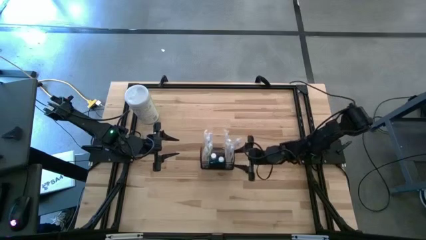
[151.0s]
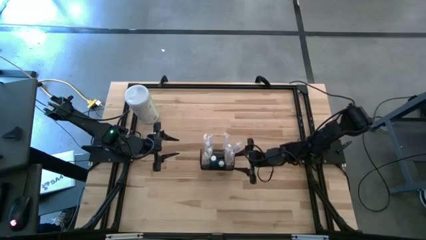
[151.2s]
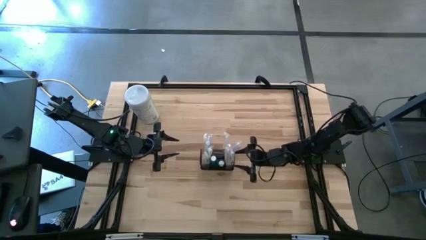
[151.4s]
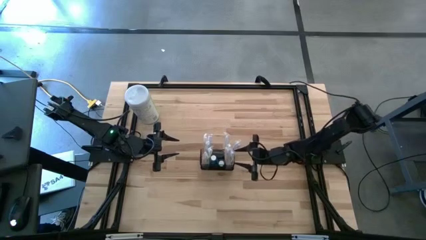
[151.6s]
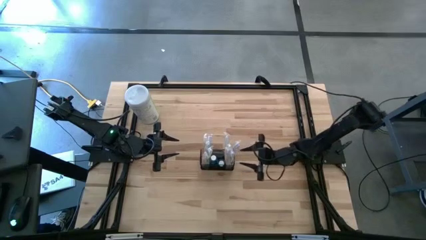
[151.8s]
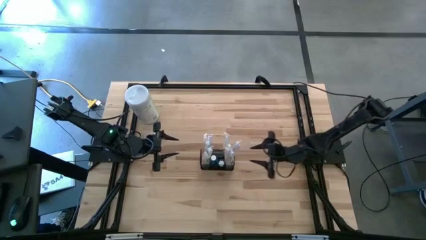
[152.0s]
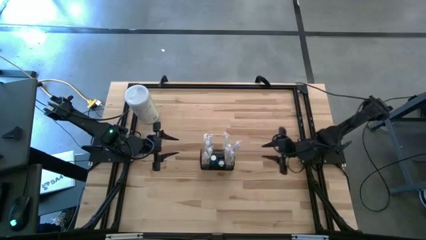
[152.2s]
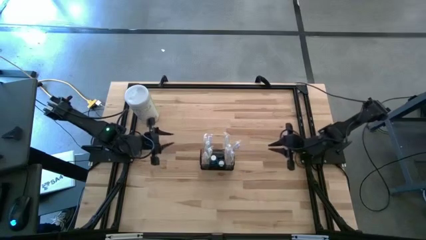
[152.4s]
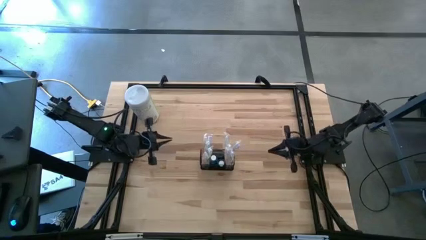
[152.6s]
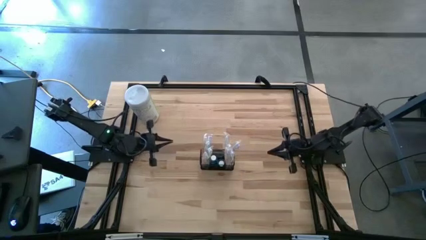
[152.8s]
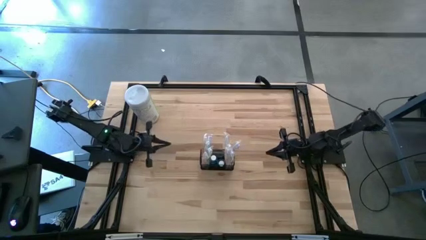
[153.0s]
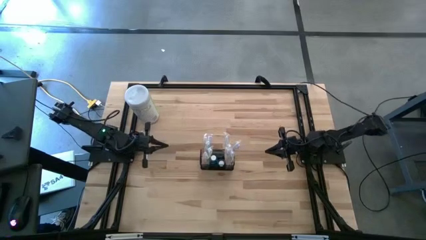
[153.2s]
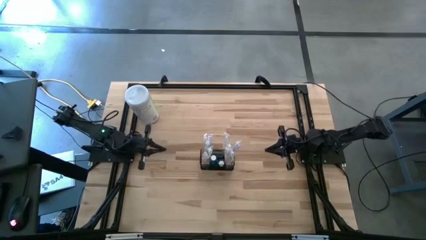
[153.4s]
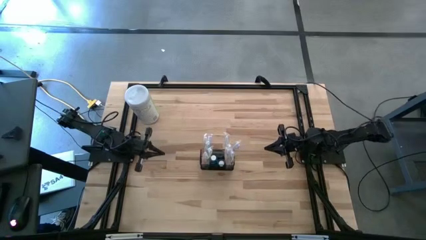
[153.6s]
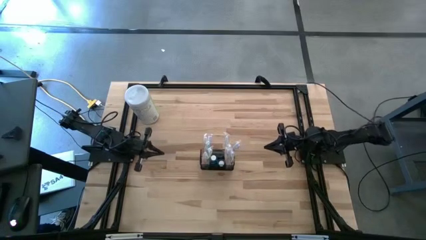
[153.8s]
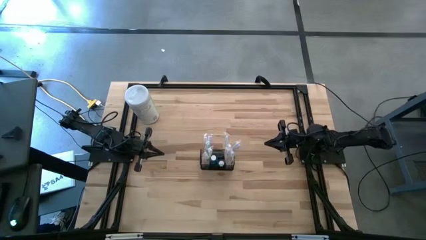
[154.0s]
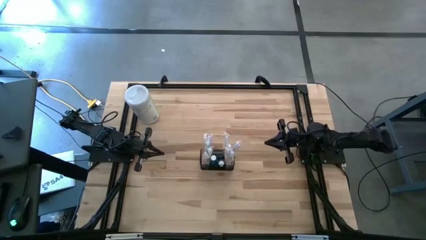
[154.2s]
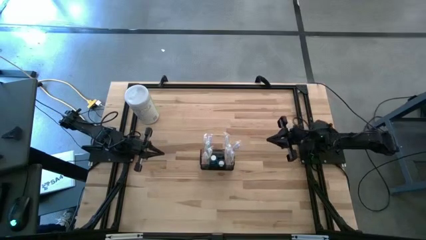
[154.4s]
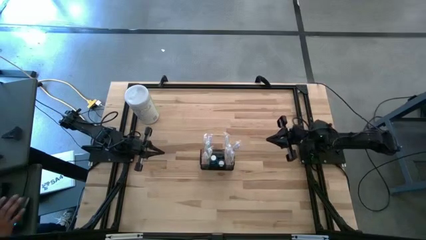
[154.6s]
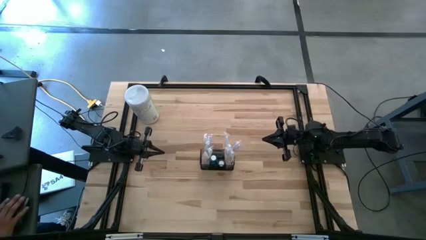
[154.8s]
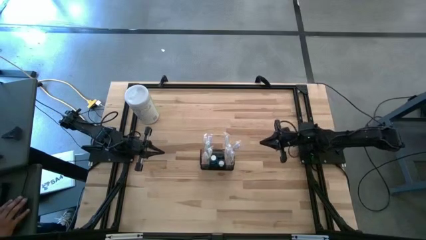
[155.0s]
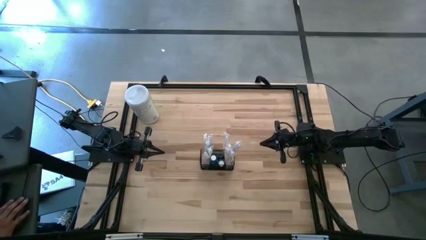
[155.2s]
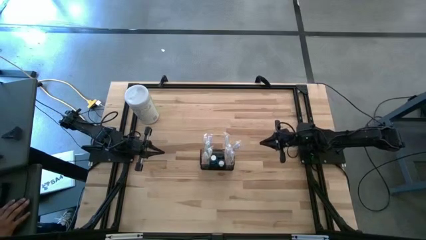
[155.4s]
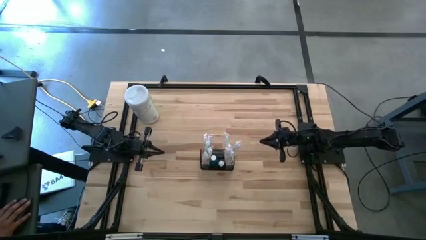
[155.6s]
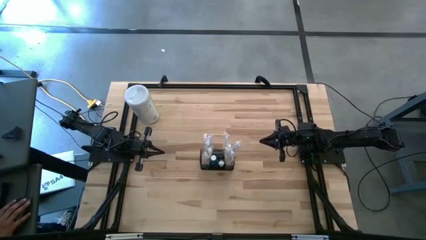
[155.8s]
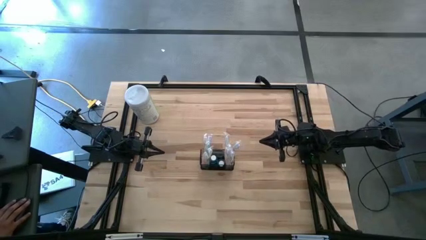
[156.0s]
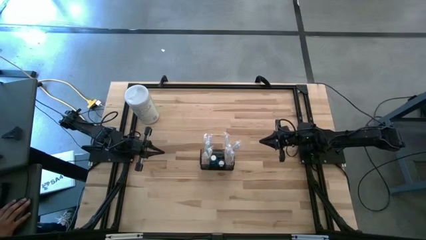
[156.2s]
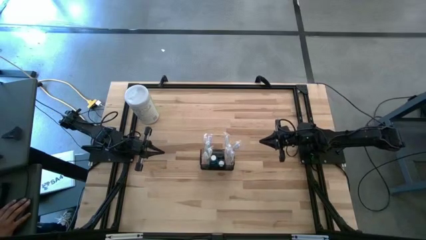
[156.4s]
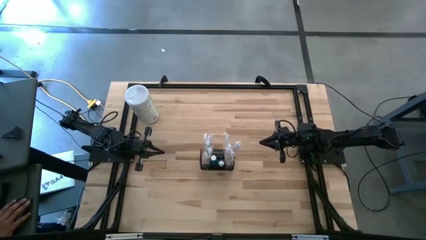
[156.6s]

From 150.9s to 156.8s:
Task: Pick & Place toothbrushing station
Return to Home Position

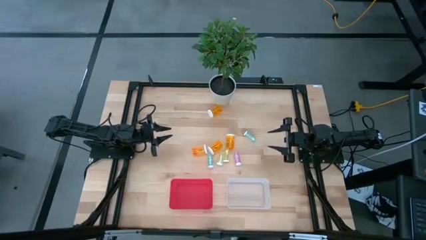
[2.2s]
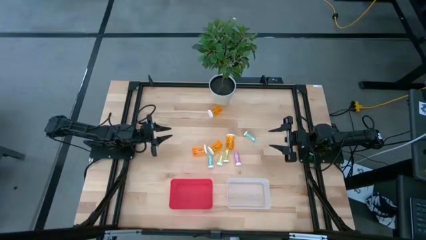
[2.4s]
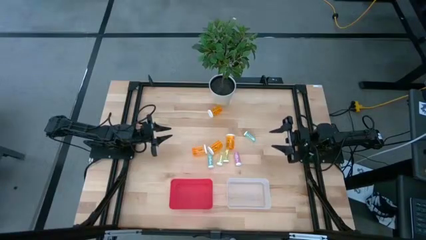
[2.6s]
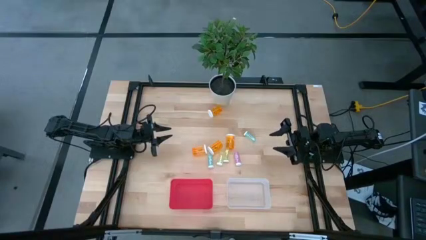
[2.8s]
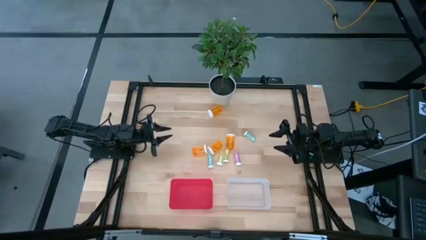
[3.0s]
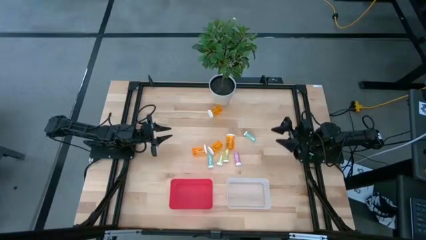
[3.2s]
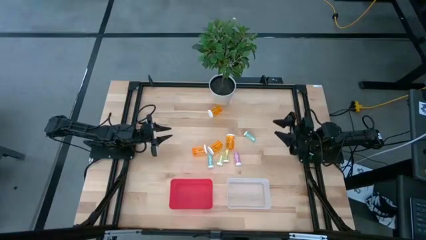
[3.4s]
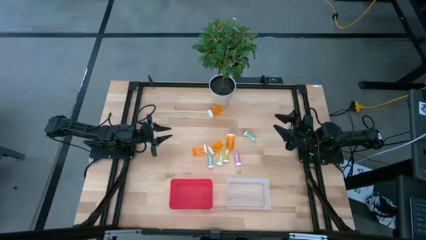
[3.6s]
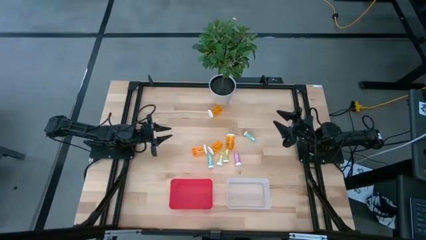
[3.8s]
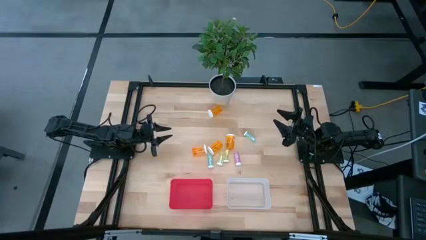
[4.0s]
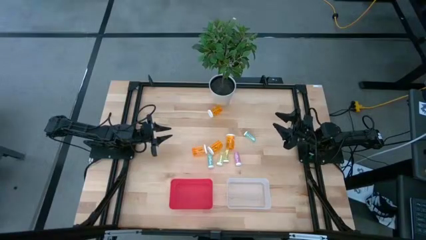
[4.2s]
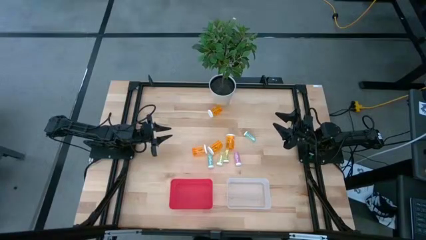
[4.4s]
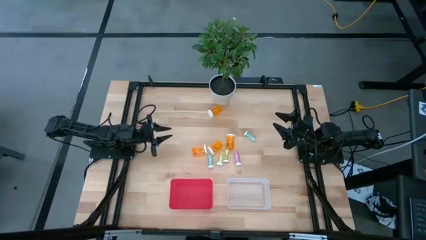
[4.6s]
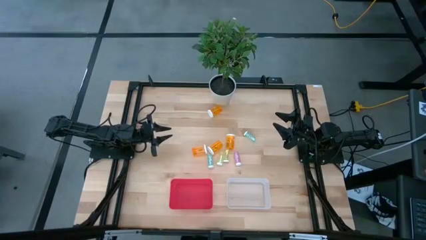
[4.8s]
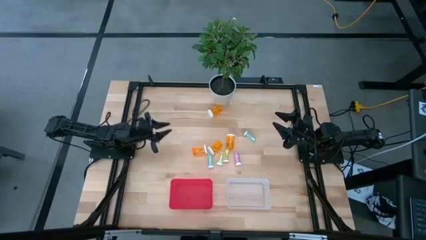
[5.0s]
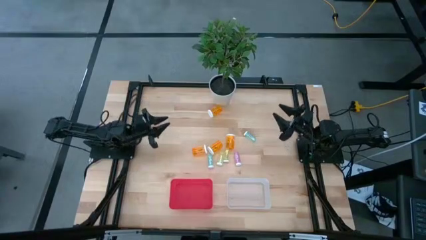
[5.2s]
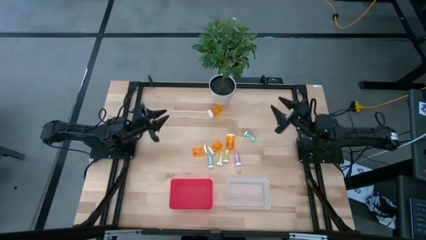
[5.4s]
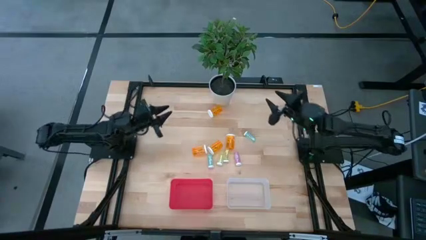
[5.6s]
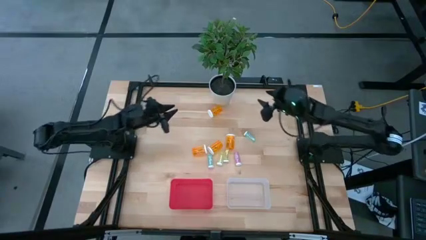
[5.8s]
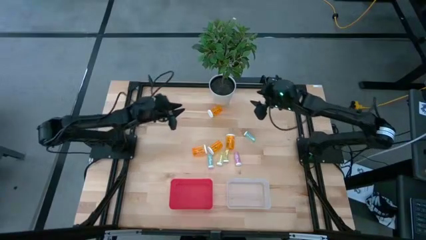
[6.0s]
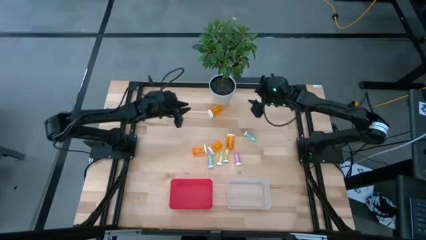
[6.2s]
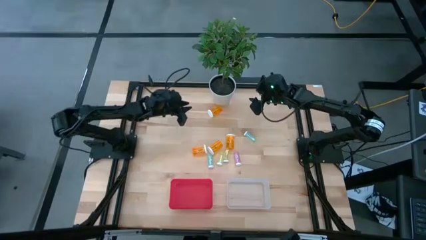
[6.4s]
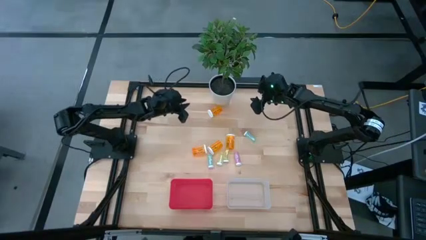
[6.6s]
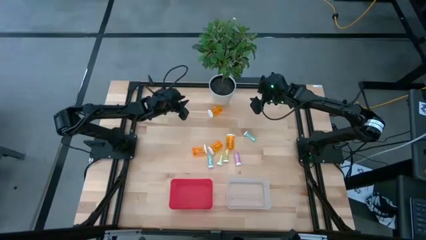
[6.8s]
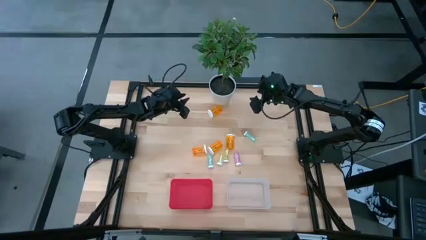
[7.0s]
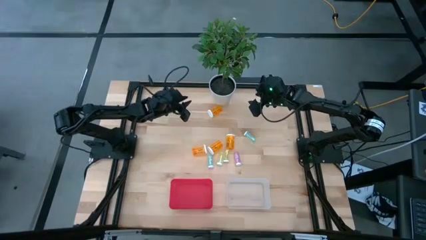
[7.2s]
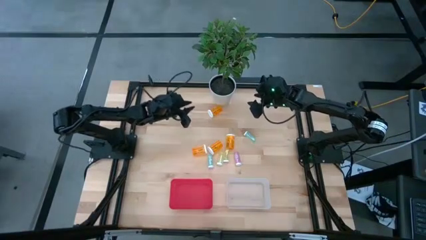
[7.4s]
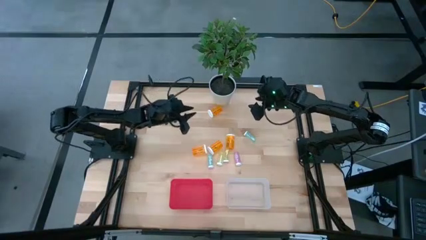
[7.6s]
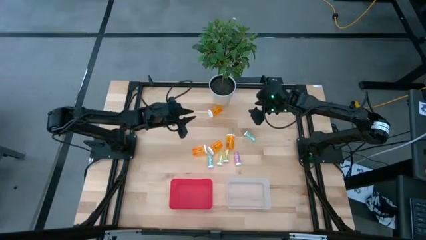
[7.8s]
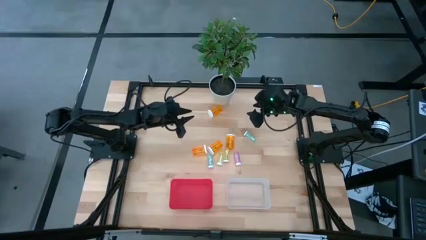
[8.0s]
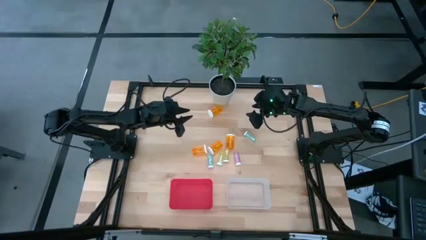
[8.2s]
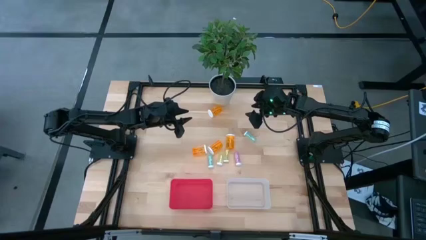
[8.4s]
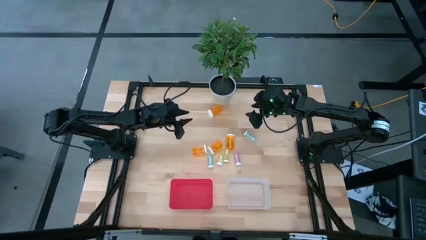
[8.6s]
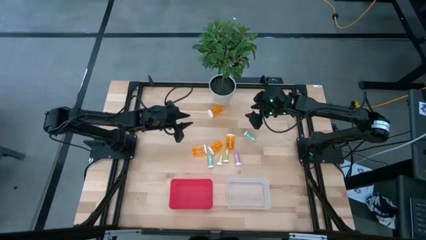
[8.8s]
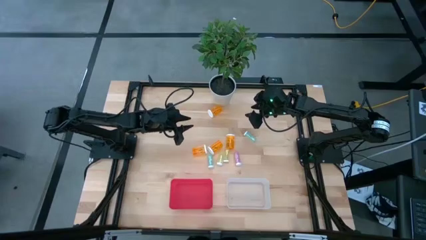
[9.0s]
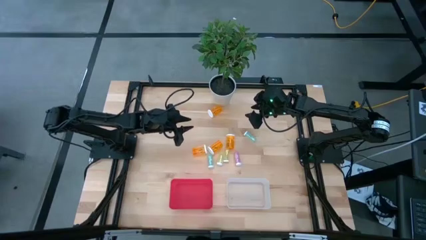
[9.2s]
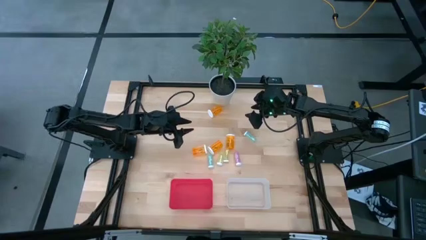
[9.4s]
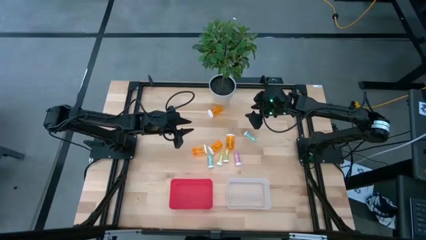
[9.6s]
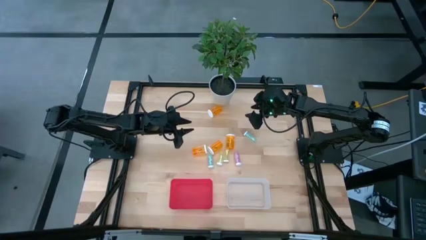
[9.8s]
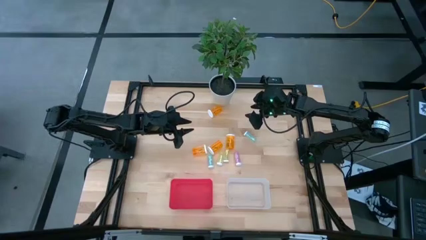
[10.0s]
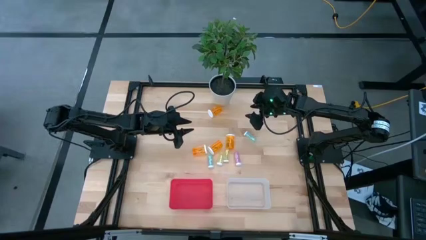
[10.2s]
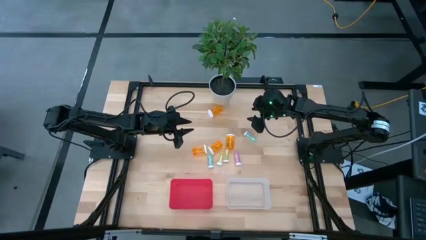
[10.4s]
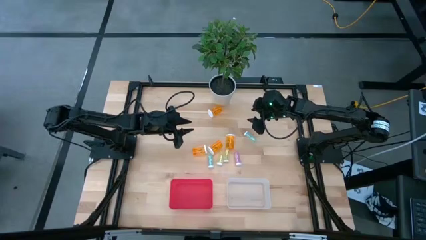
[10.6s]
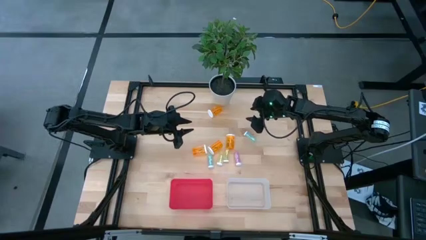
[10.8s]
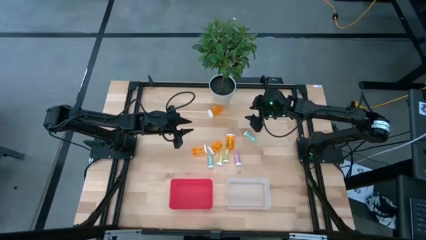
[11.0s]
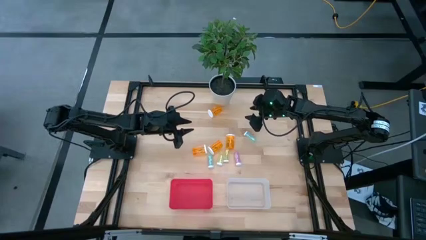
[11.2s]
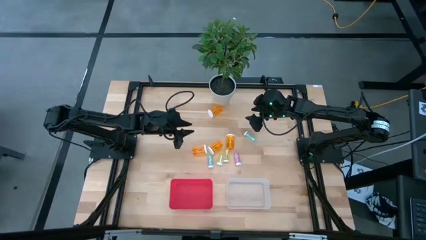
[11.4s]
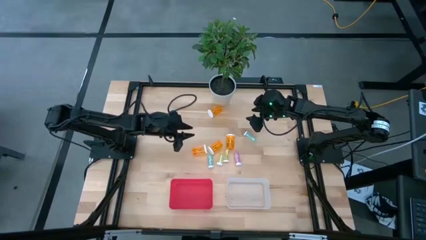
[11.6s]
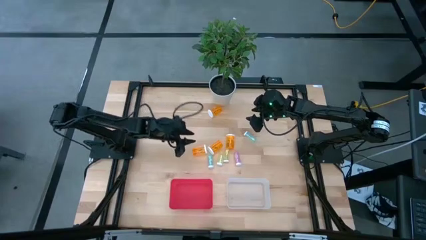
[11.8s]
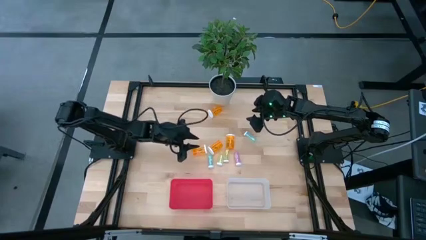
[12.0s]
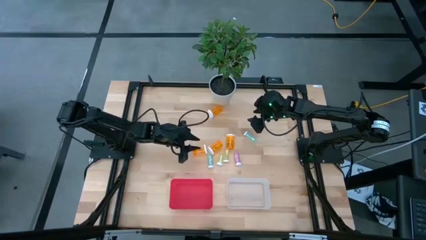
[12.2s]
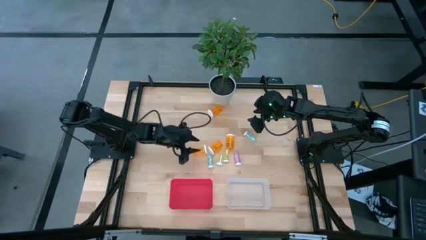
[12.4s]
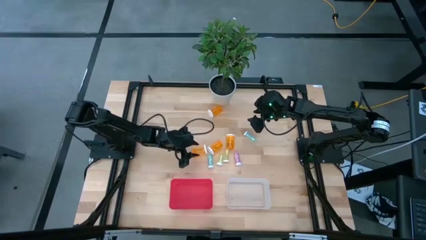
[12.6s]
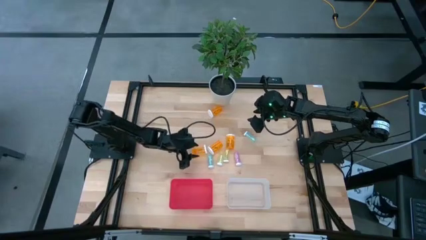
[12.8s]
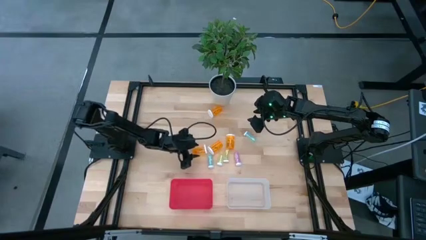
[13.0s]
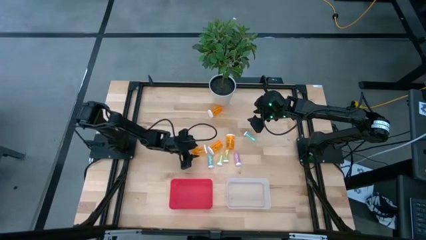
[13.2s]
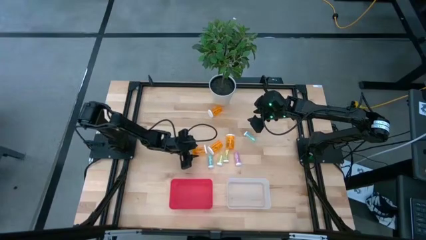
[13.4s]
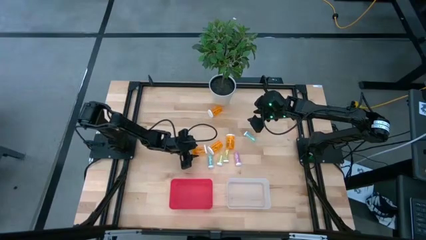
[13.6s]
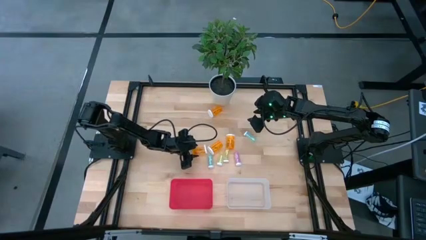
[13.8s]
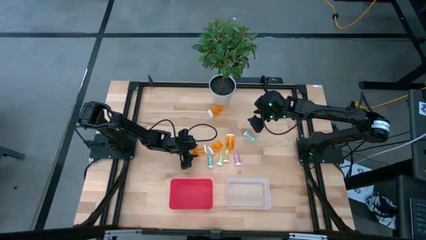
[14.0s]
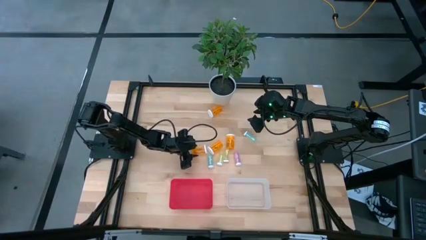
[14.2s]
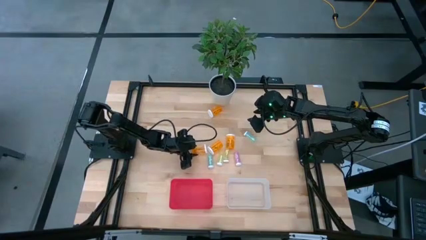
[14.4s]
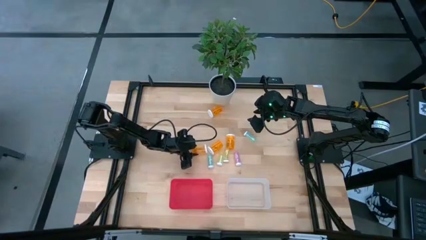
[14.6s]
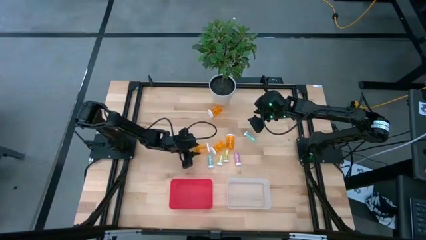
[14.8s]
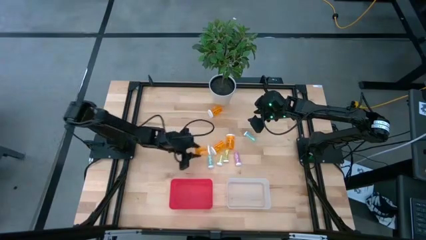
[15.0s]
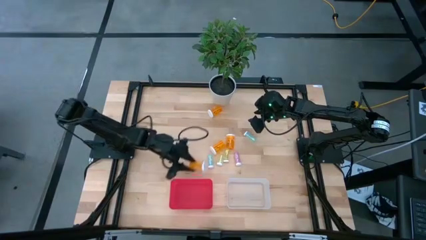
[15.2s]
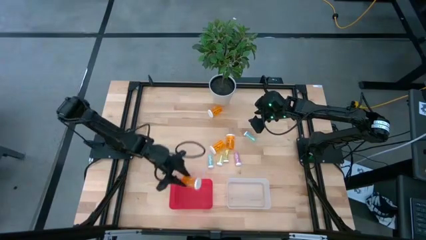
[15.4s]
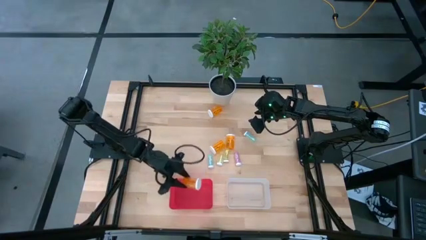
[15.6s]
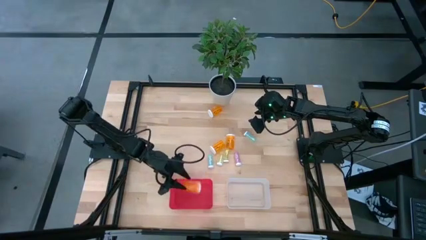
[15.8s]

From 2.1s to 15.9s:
Task: Pick and place medicine bottles into bin by pill shape (circle, oval)
Put the bottom left large orange pill bottle into the red bin
